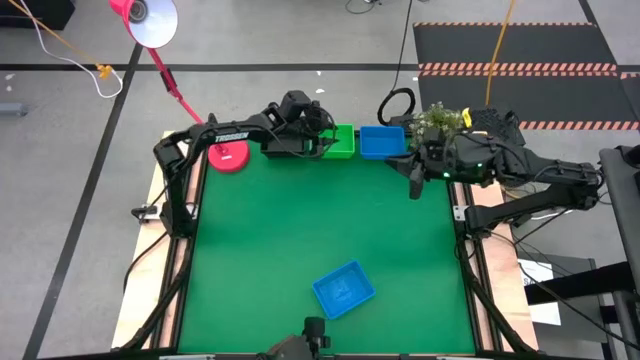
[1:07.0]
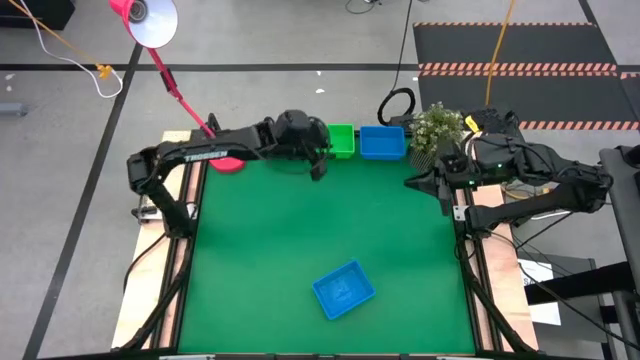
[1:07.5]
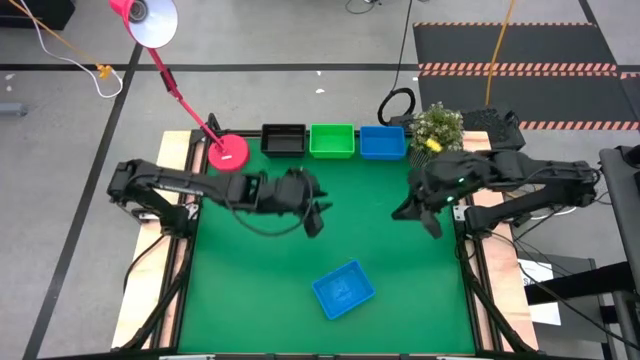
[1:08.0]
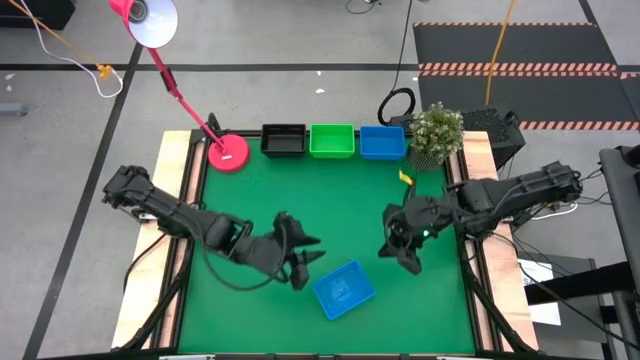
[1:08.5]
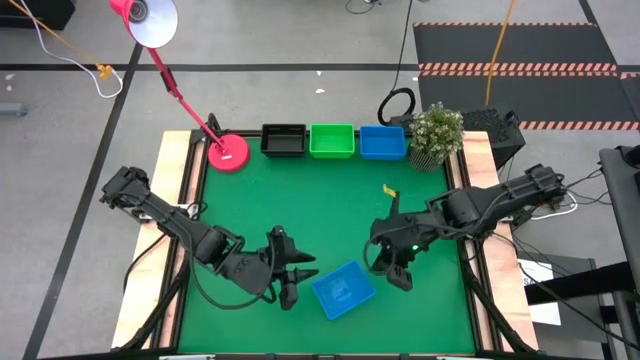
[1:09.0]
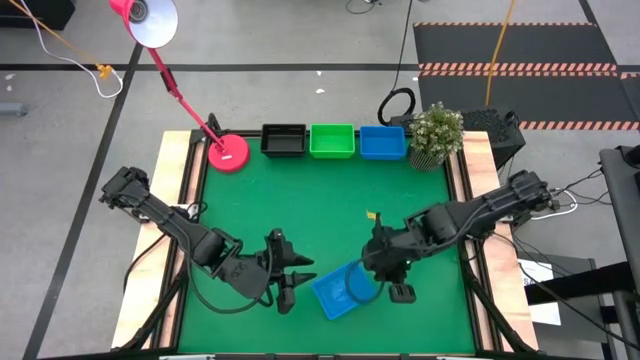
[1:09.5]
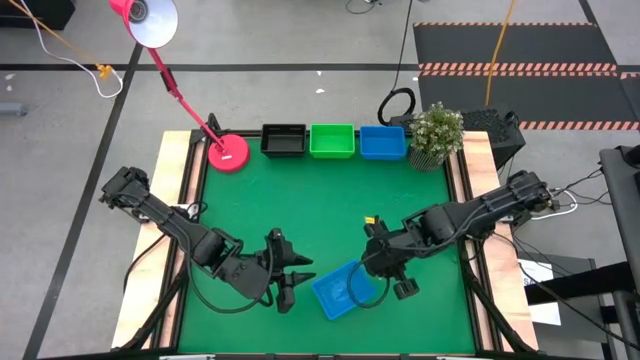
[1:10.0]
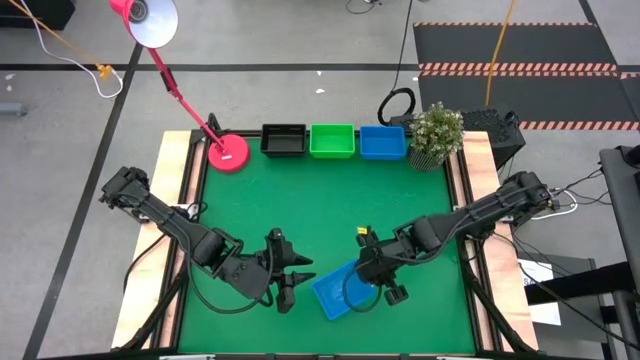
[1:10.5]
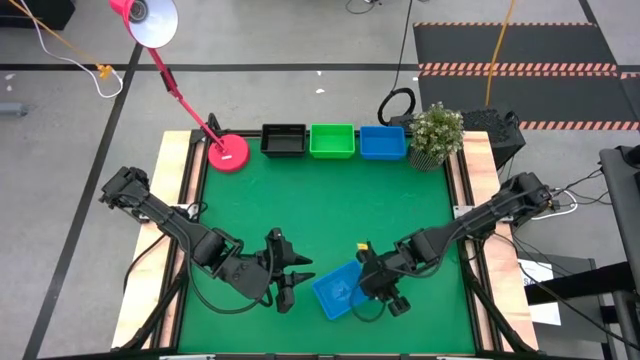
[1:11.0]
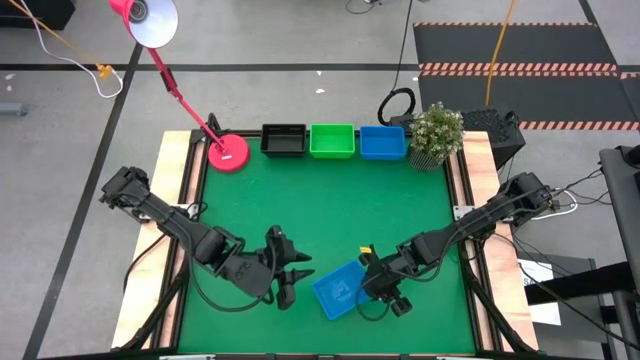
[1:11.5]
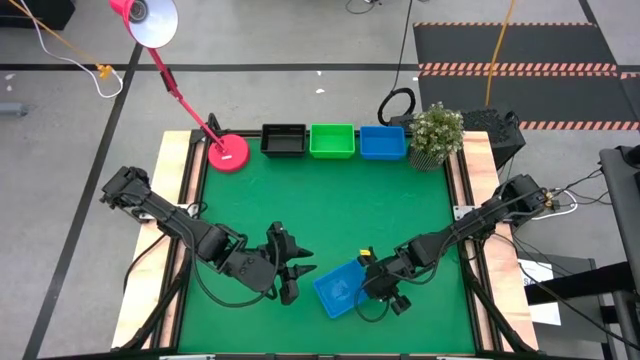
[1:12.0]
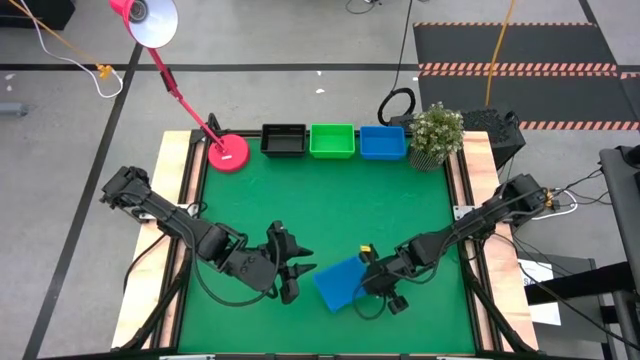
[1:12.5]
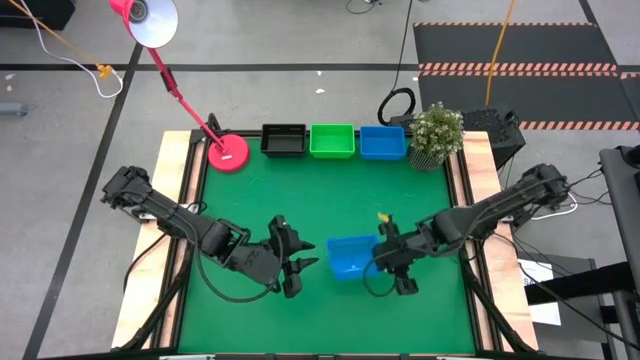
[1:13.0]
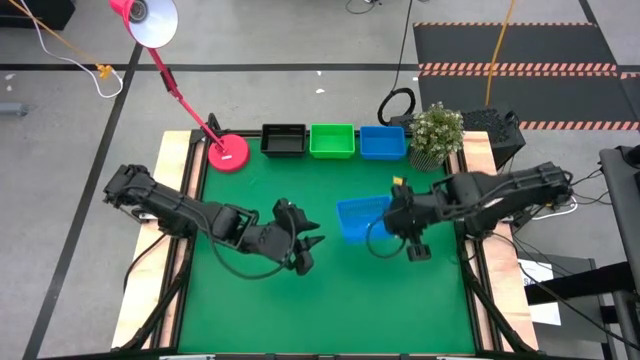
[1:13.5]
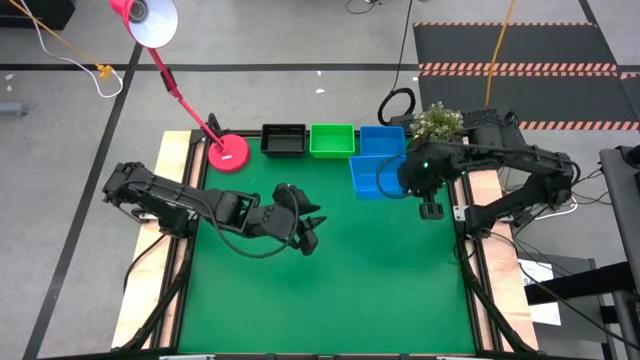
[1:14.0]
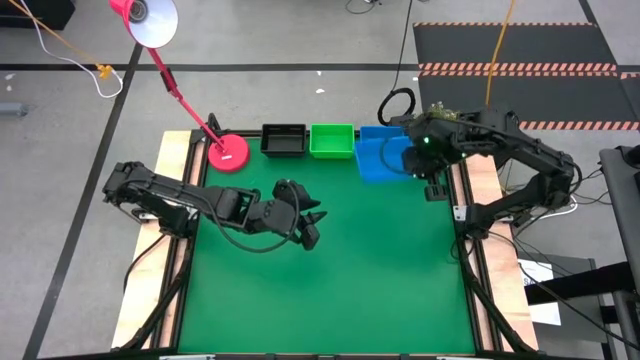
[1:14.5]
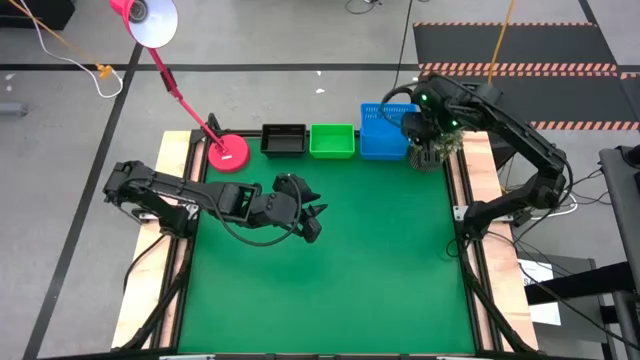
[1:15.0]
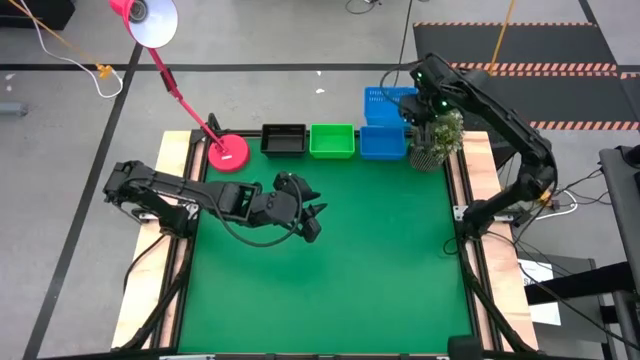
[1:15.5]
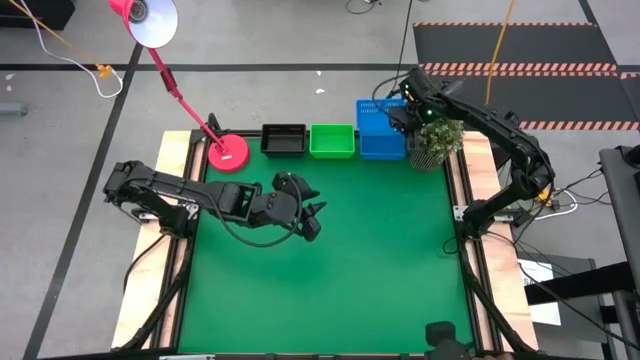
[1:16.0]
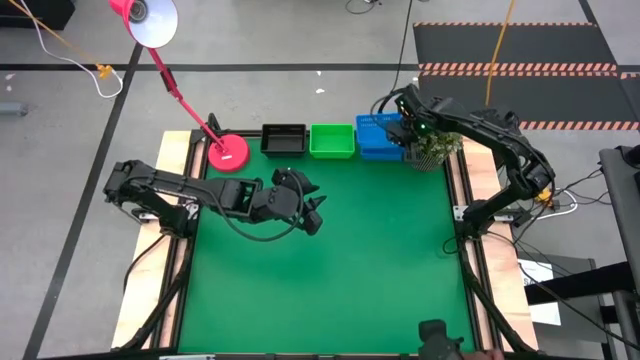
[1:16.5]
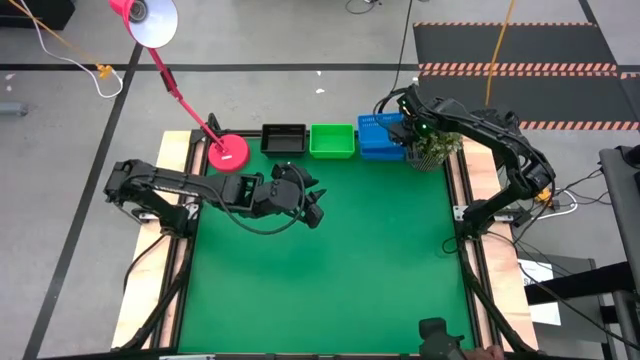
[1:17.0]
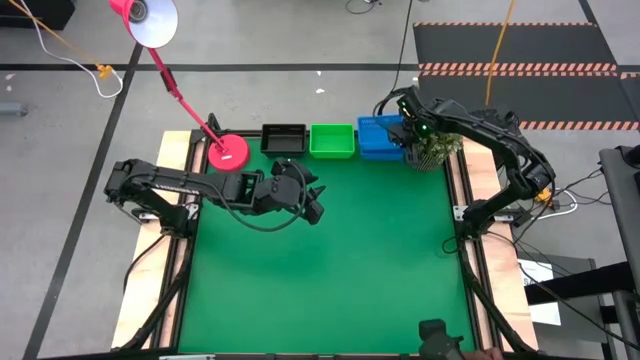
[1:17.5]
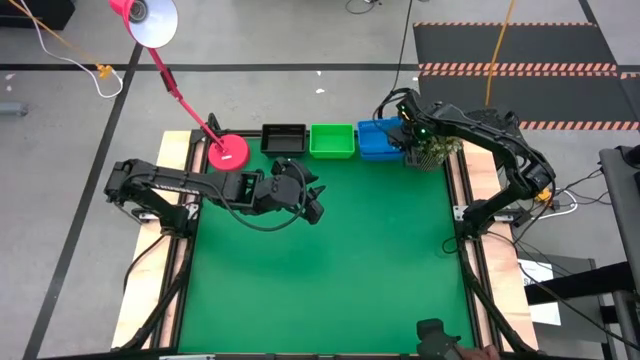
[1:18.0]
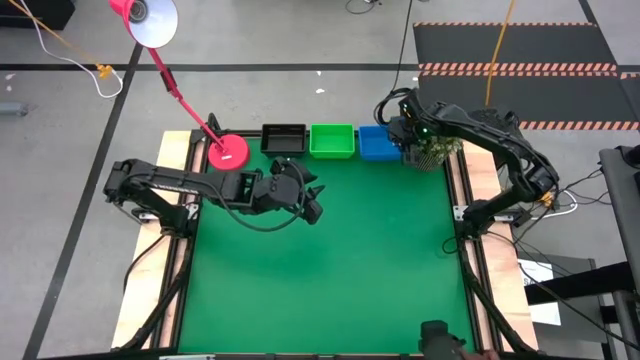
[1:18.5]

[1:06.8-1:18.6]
Stack the bottom blue bin into the top stacked blue bin

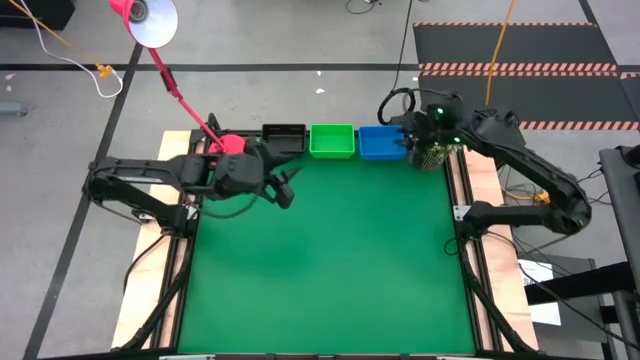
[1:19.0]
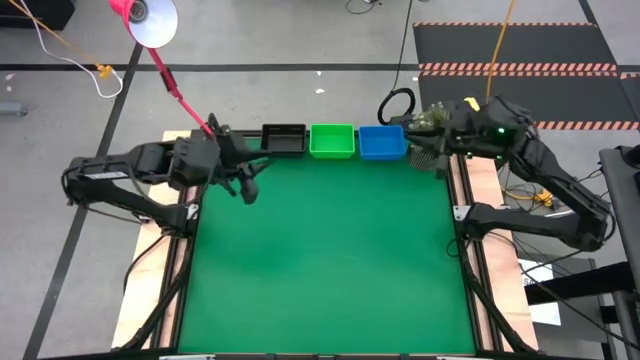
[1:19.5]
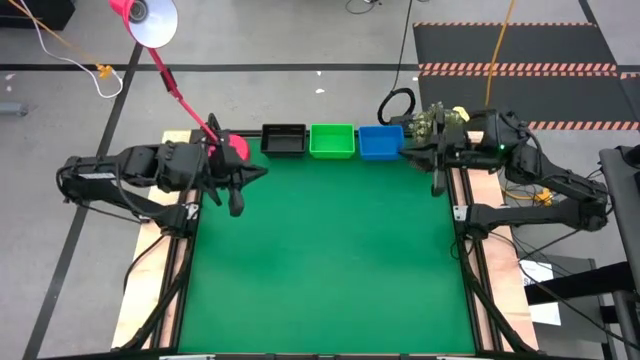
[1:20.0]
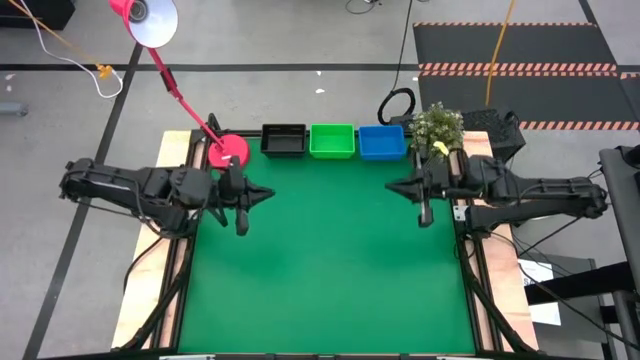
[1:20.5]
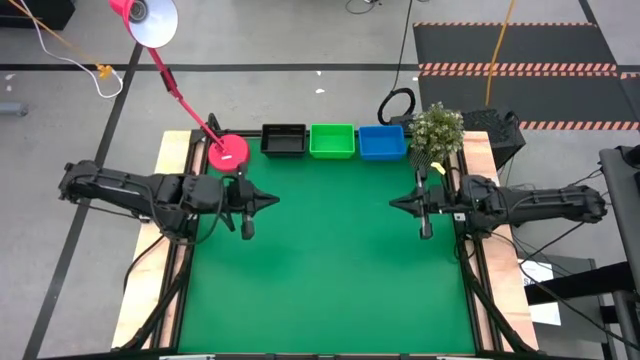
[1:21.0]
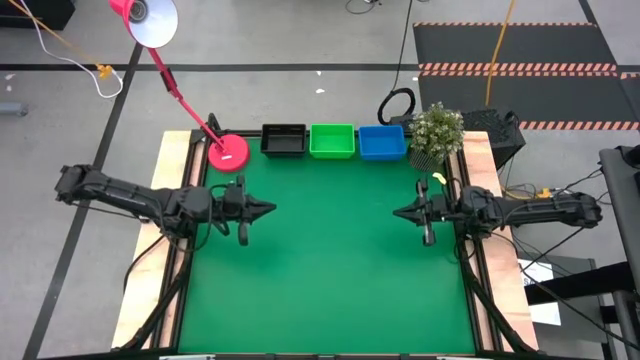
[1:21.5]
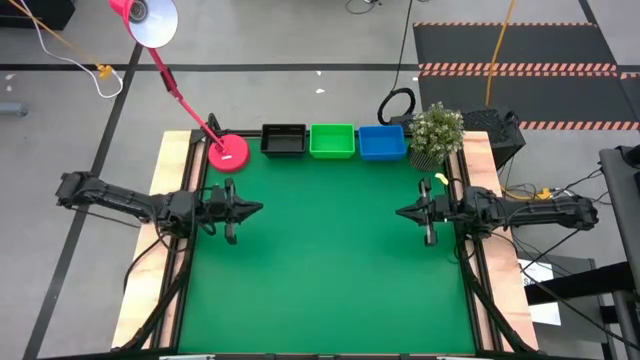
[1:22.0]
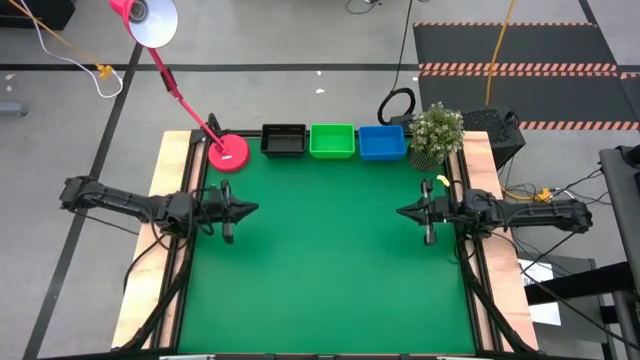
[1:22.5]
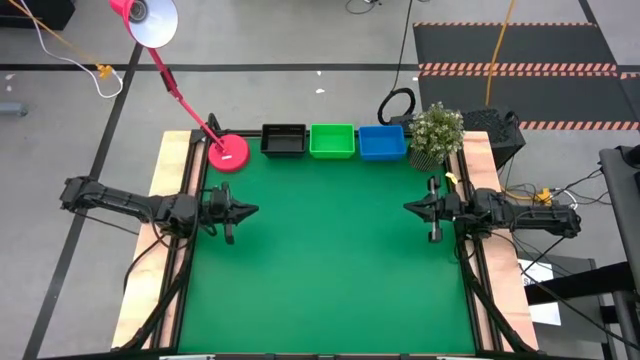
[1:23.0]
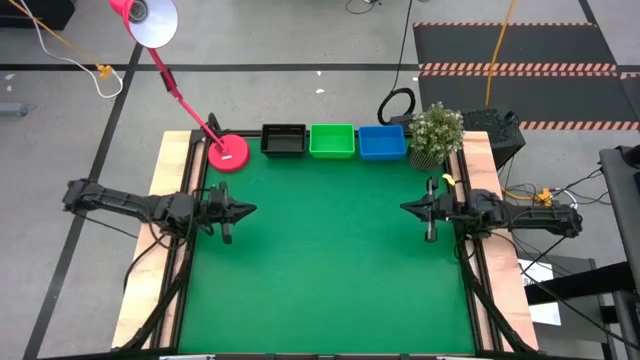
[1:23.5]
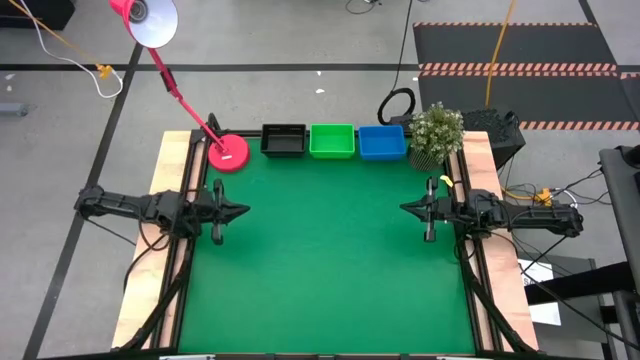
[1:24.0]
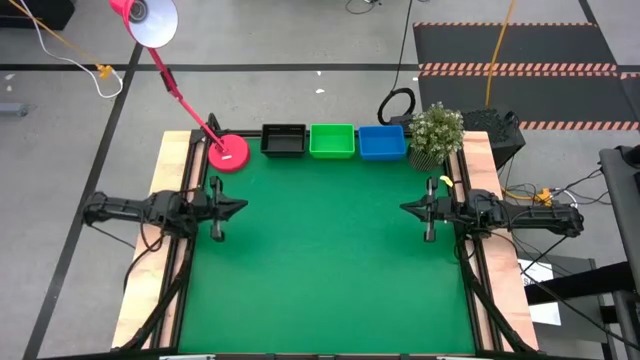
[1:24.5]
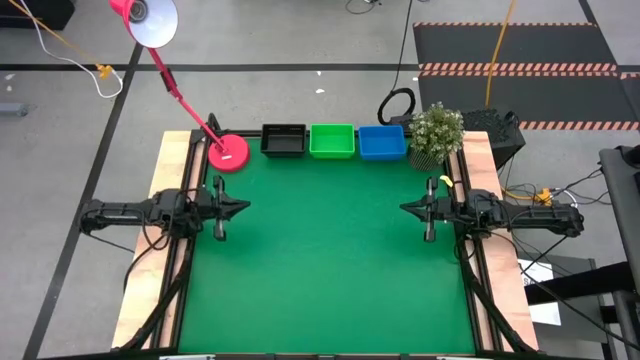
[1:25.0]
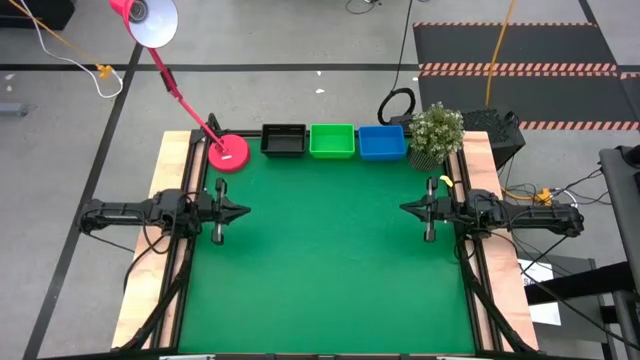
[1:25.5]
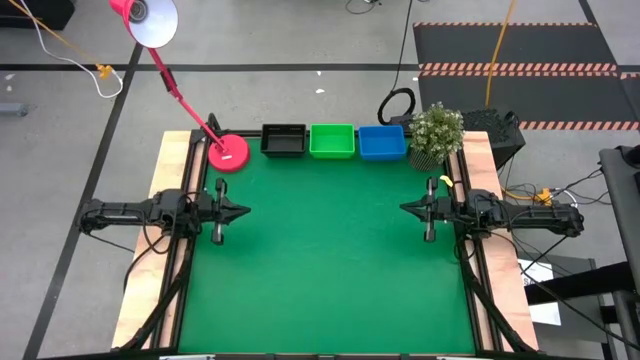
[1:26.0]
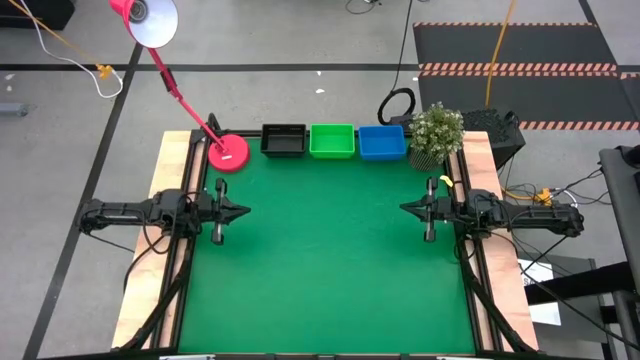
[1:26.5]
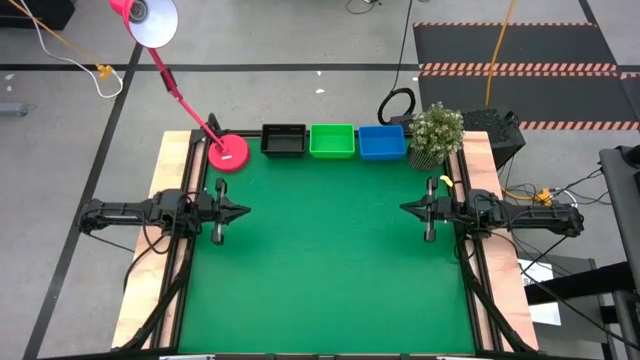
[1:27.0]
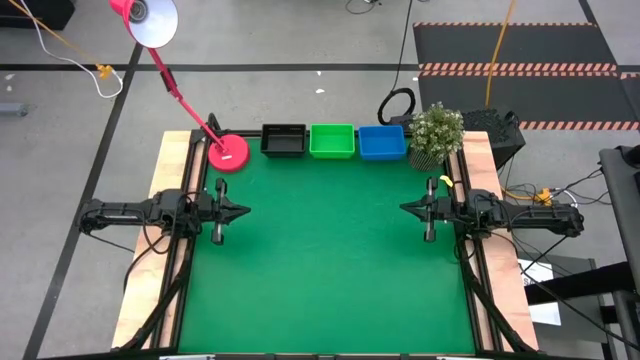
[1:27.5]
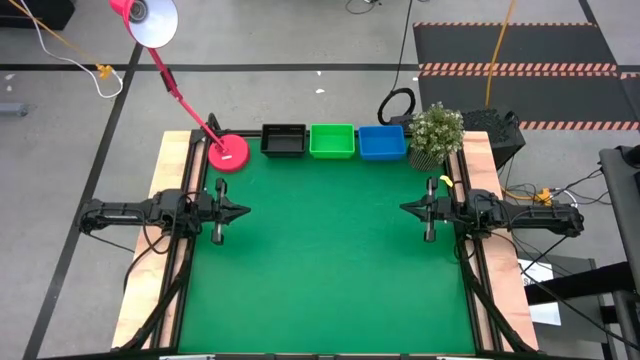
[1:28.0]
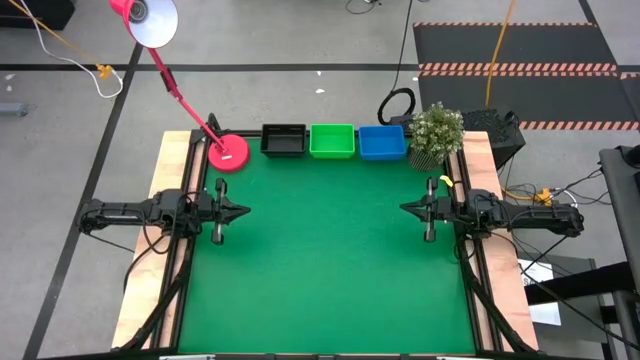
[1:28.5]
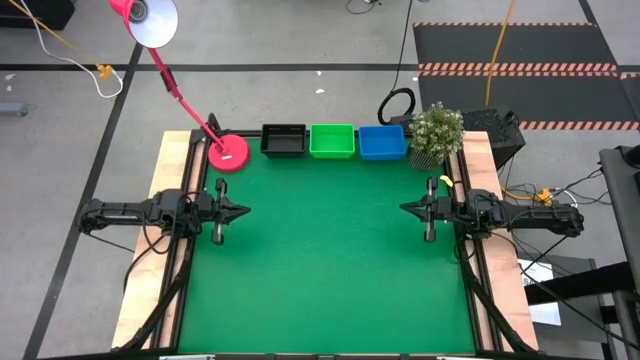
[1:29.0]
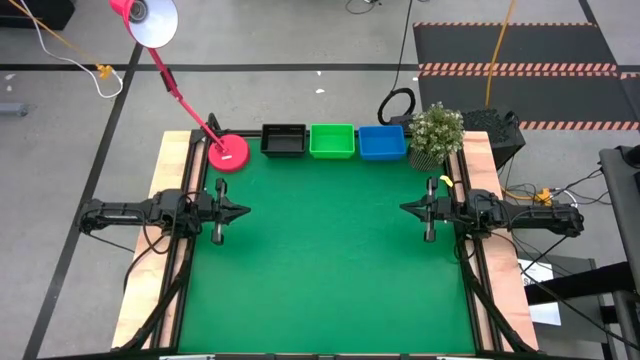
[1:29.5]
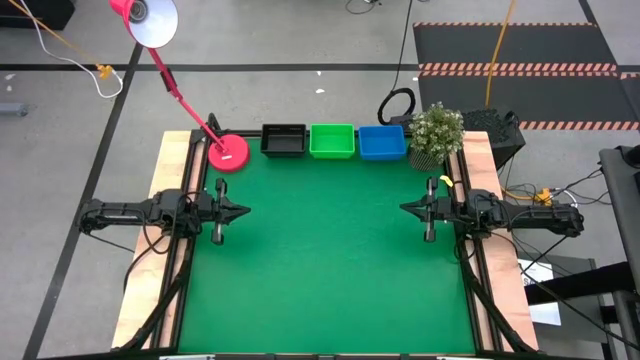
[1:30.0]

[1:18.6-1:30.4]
Return to Home Position
